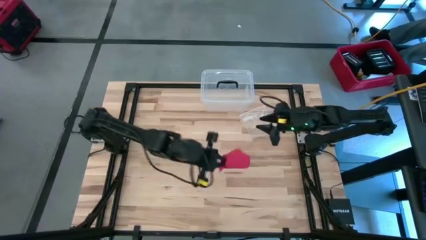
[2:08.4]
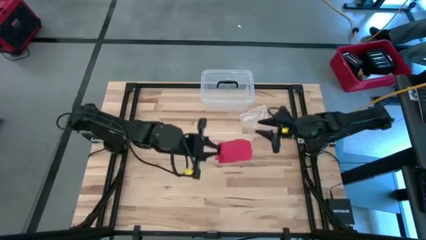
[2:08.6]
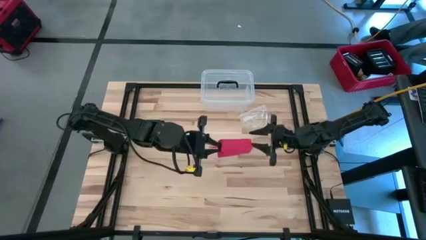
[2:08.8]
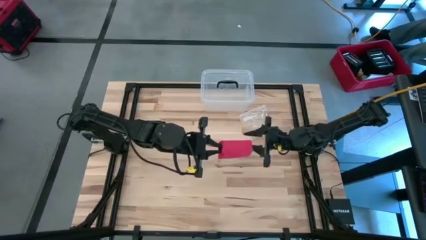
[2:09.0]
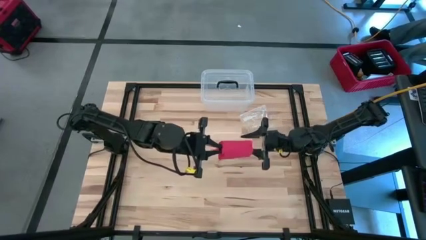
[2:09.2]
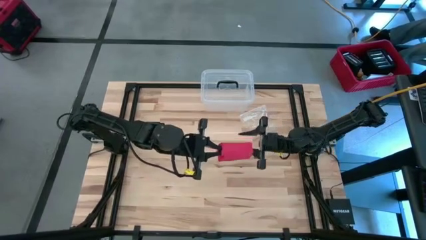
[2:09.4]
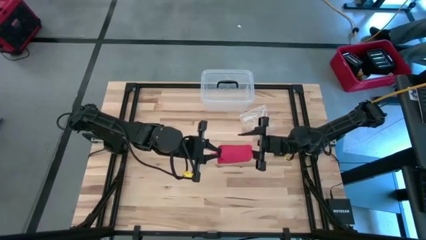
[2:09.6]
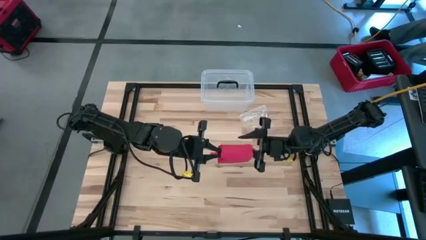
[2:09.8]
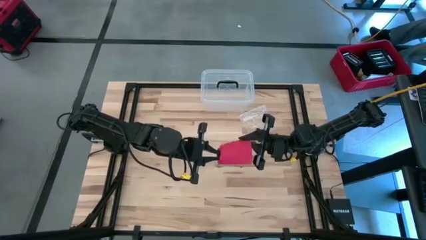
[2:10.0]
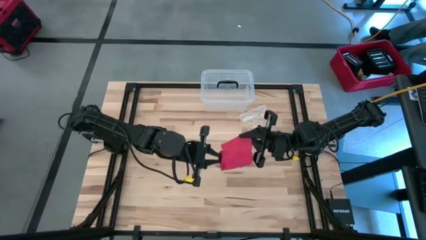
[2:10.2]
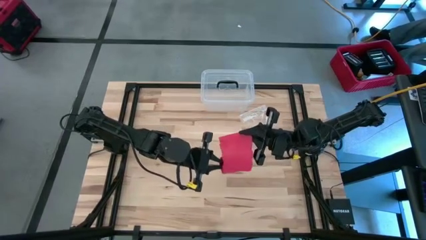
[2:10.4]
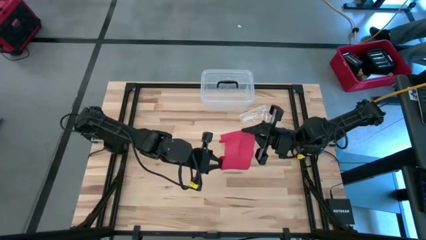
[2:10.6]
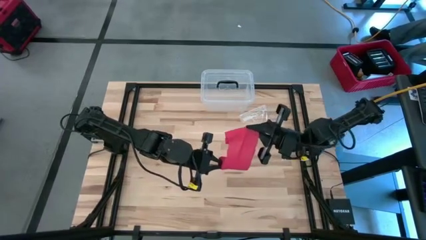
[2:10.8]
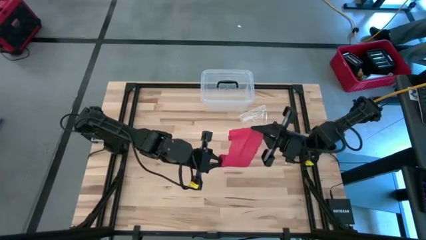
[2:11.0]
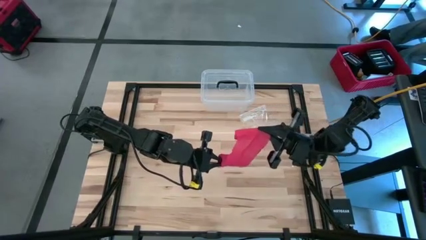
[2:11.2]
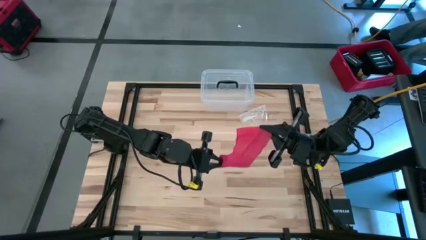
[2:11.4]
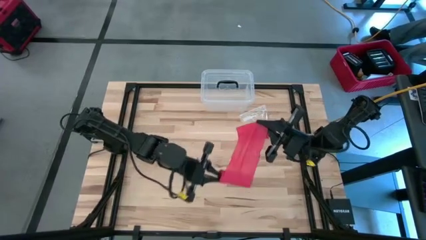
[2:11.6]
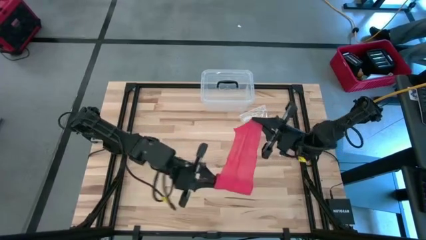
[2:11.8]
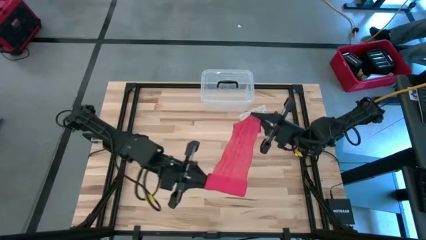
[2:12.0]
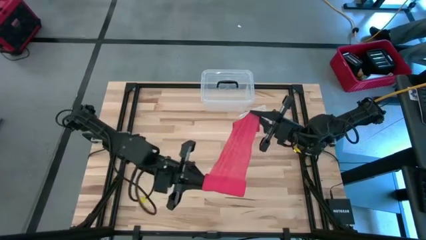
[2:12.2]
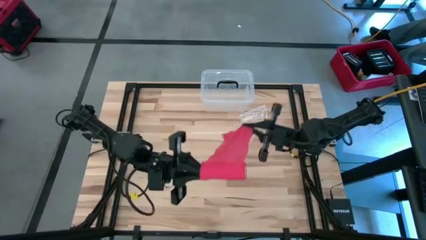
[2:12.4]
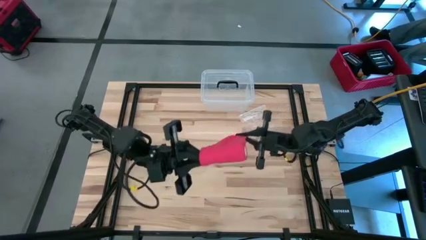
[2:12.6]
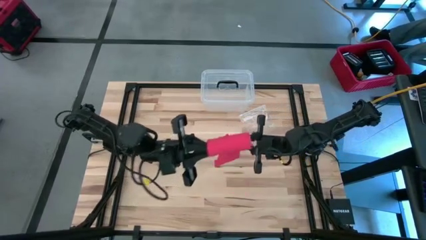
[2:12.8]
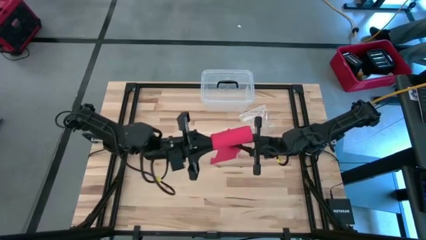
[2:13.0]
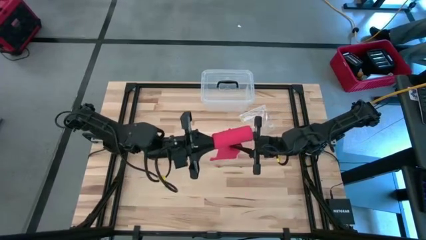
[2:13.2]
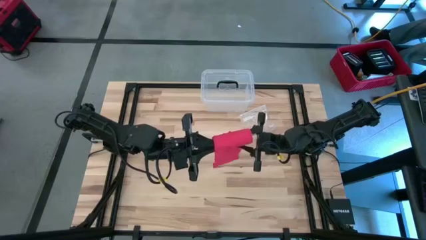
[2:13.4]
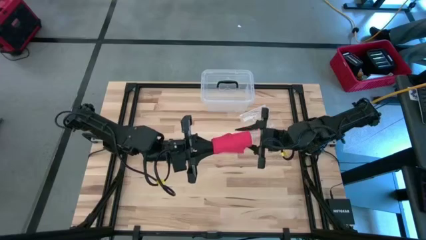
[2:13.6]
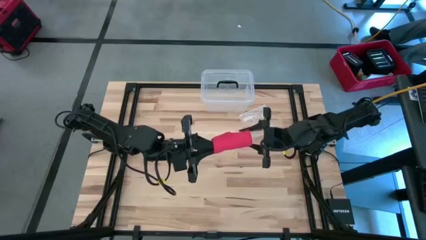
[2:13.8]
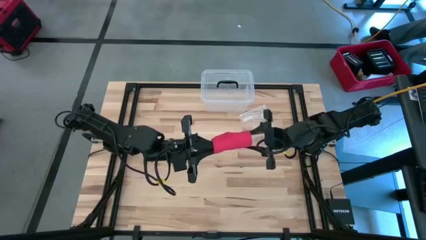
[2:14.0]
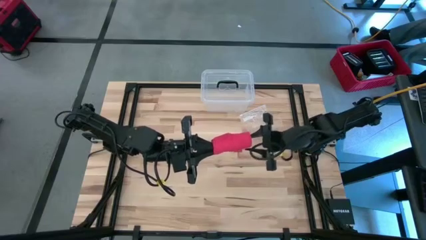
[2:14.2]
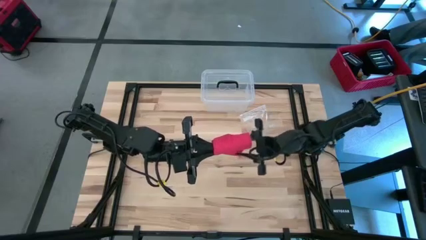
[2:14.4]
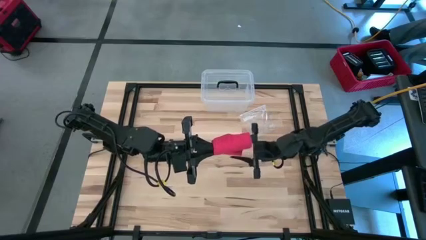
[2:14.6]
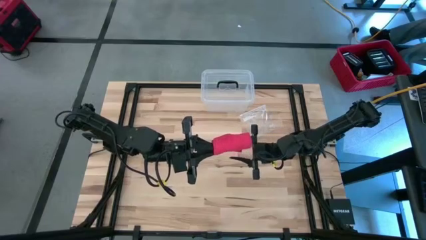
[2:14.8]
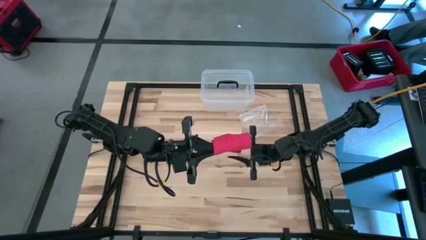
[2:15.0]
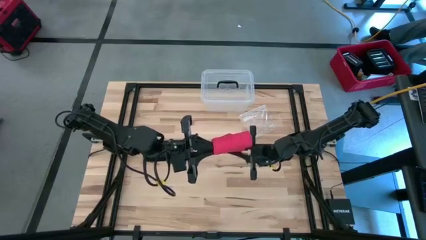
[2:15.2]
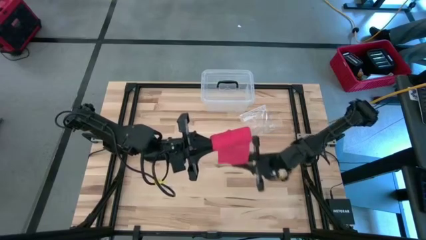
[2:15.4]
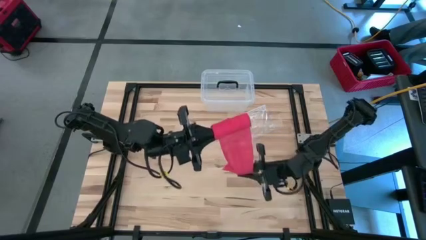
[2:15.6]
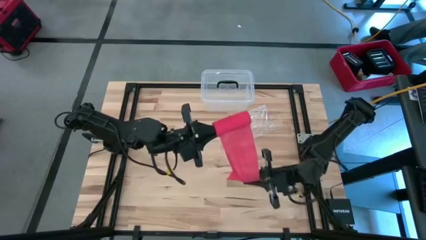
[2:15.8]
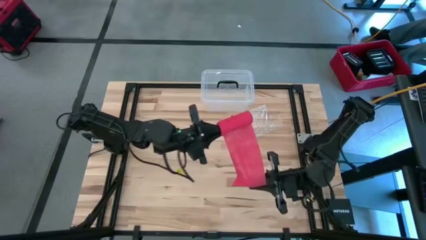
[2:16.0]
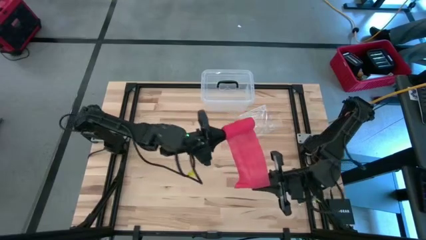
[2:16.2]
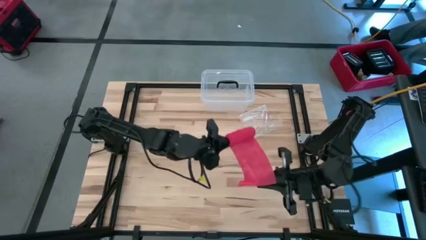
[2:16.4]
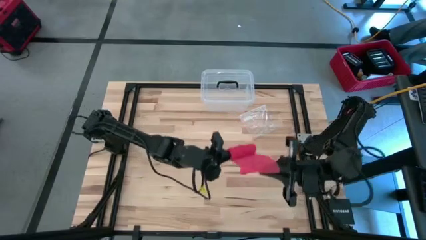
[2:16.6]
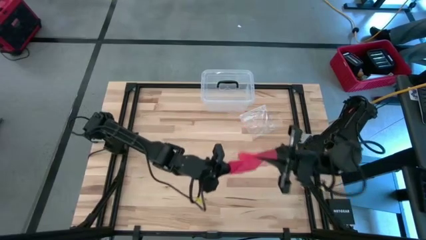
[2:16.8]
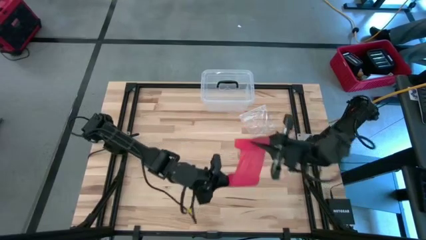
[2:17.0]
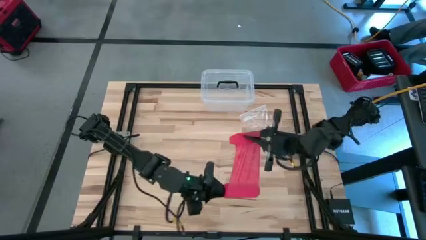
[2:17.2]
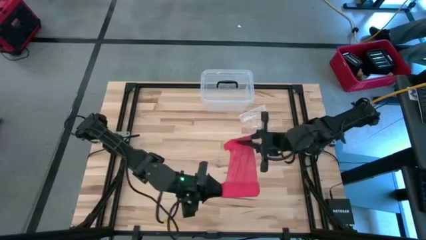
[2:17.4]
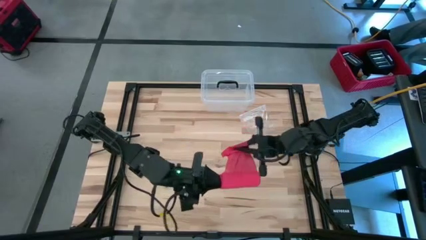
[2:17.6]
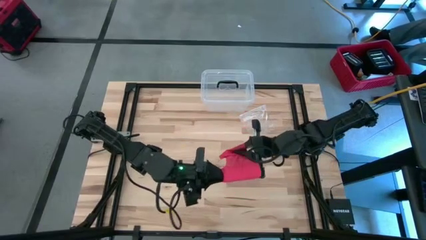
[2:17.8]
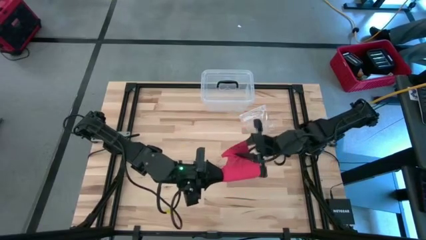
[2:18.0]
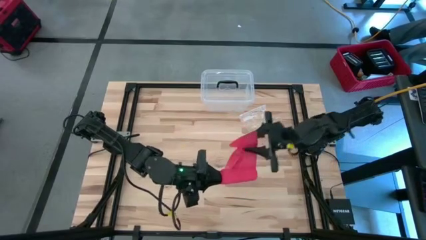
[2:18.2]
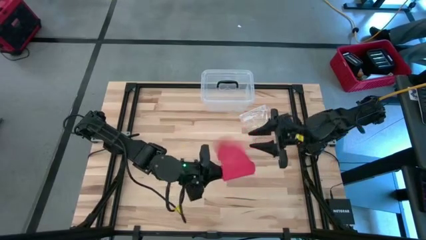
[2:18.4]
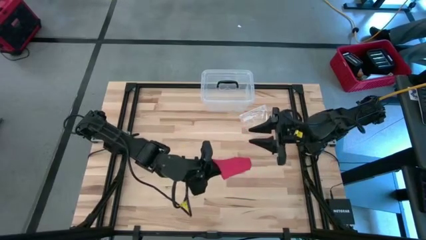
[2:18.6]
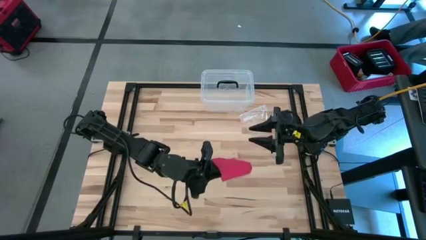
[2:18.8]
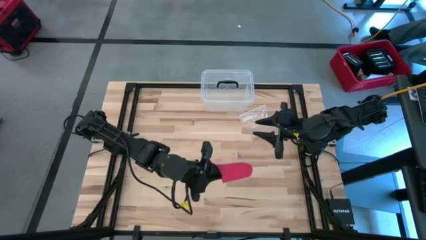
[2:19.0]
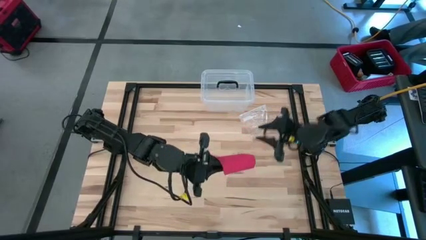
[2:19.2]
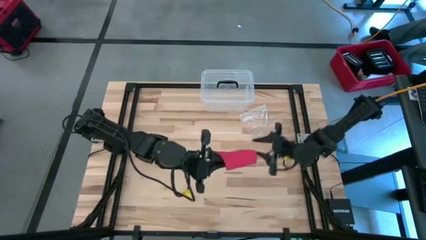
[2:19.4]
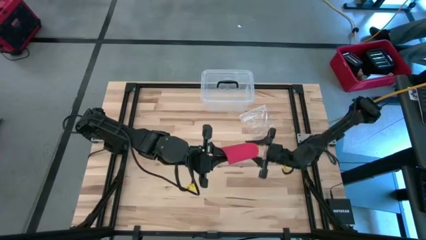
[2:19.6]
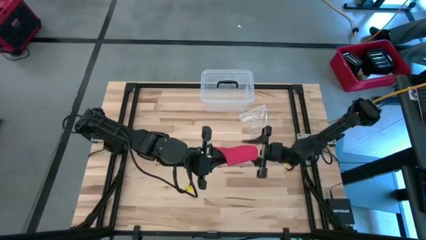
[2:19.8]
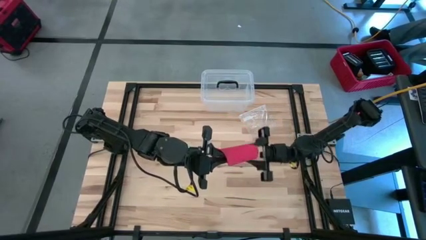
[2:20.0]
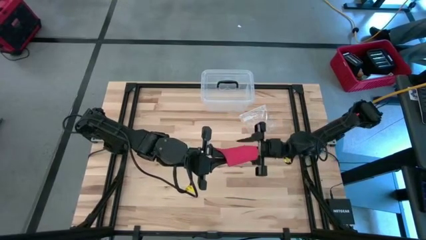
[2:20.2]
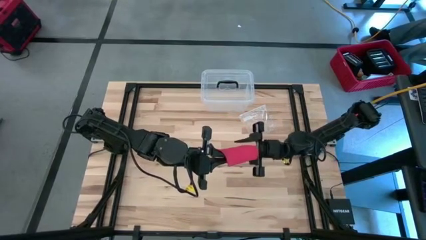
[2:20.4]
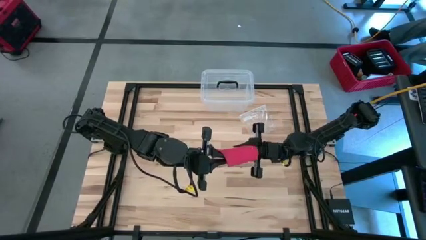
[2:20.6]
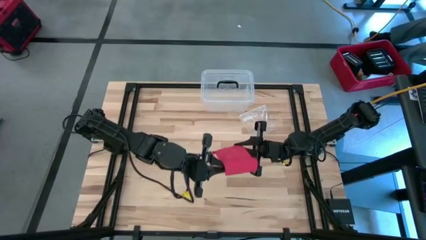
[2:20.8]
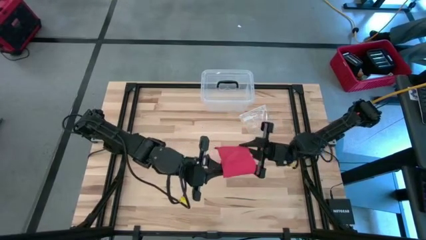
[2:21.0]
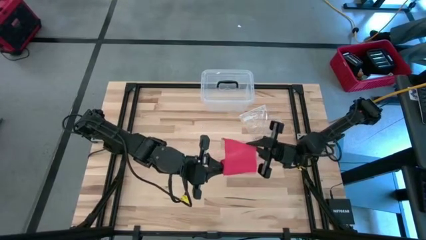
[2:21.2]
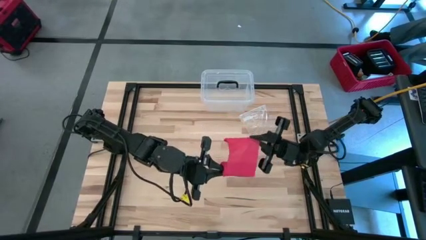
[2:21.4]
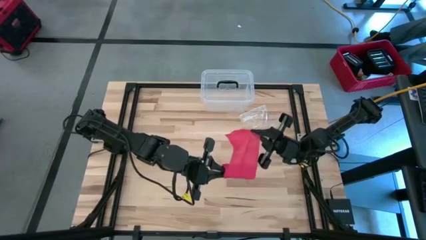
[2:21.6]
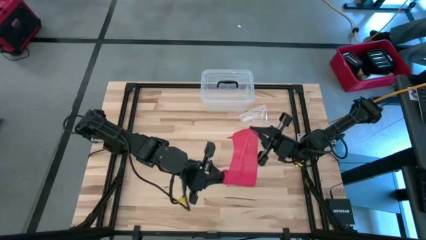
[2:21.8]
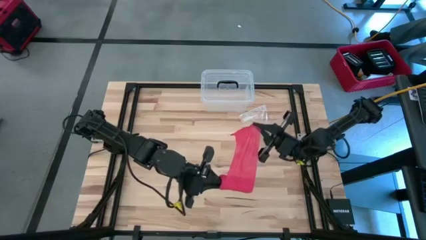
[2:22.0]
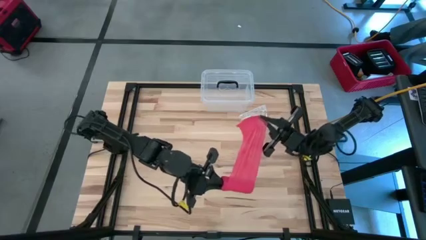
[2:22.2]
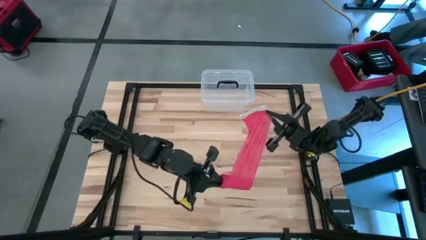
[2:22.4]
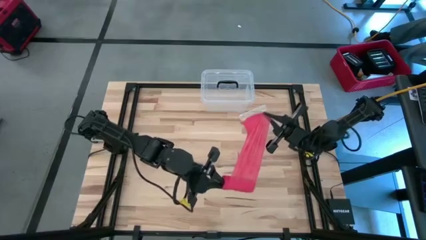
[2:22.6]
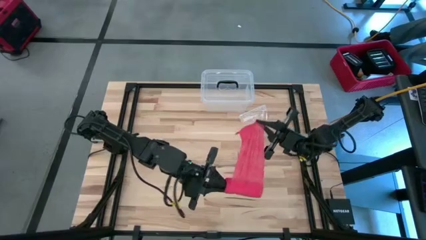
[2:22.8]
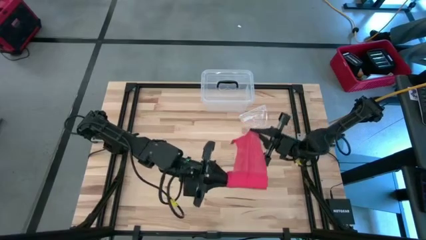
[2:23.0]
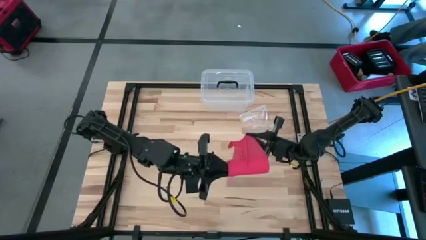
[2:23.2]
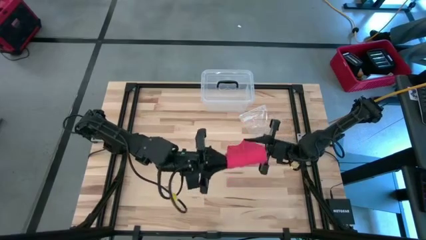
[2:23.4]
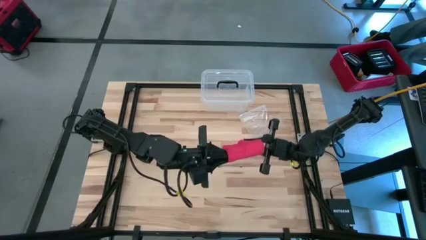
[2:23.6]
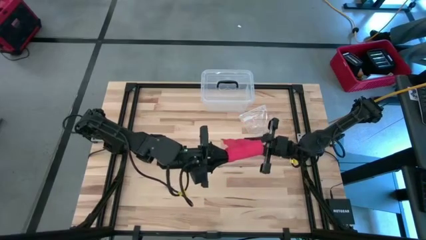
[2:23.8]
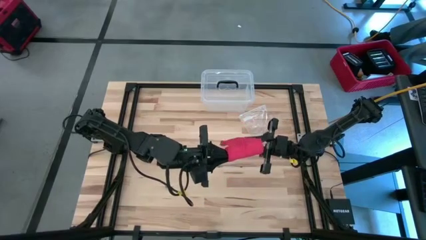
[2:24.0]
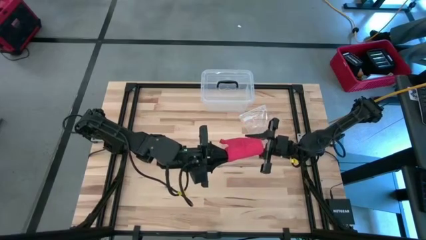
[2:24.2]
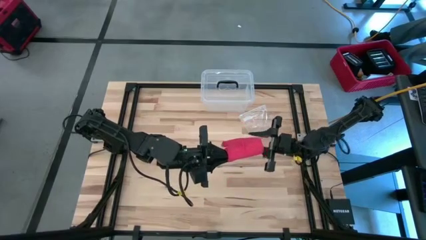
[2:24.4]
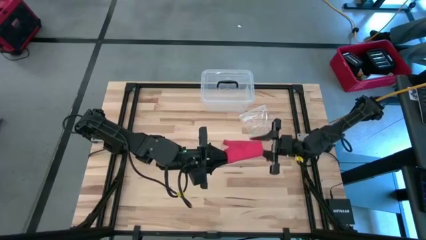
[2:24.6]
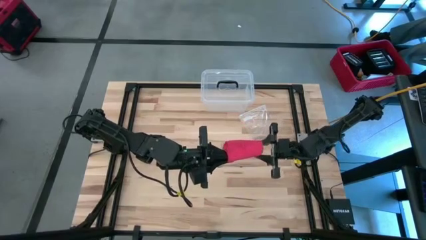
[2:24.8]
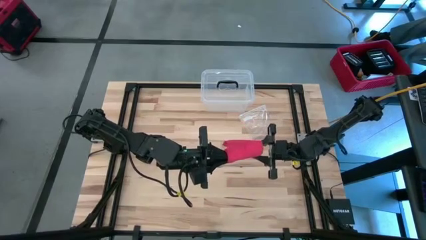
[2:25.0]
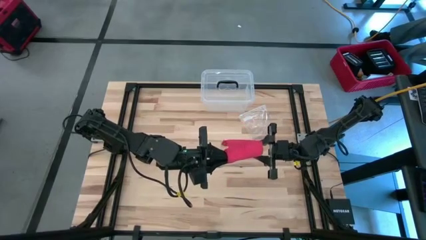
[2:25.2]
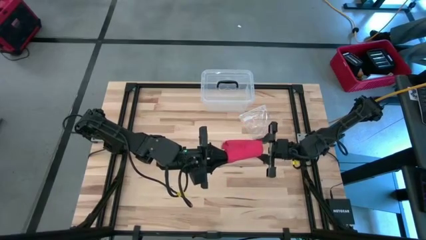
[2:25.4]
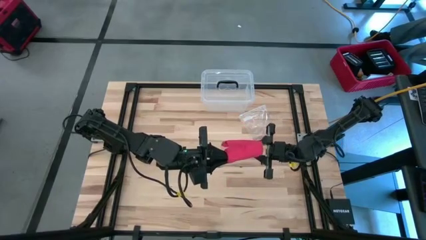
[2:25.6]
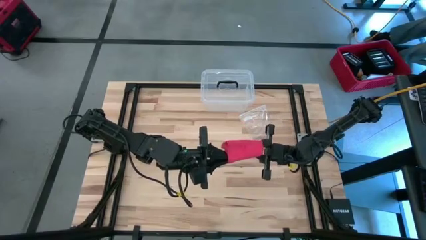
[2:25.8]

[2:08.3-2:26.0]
Task: Roll bandage
Roll the red bandage
